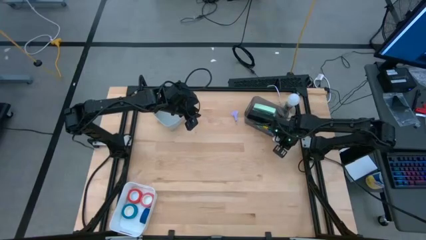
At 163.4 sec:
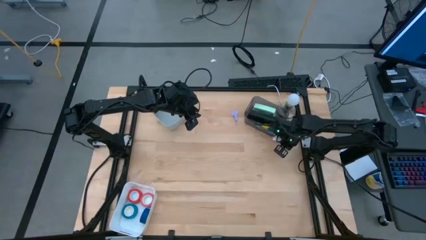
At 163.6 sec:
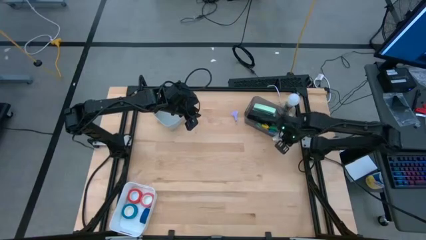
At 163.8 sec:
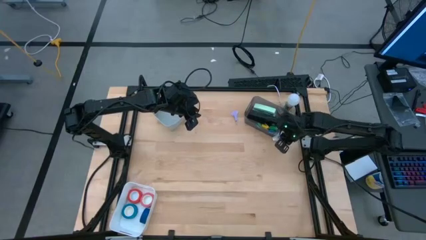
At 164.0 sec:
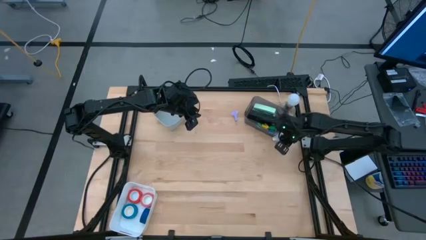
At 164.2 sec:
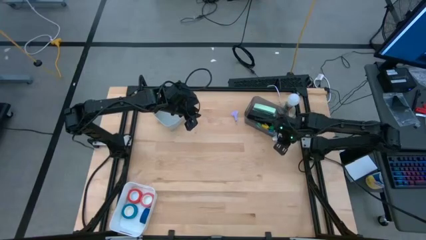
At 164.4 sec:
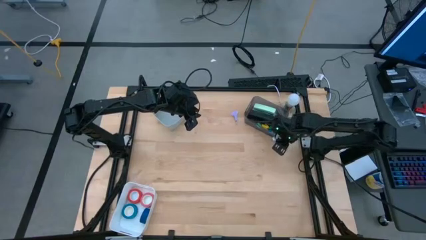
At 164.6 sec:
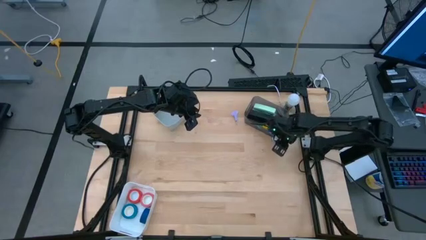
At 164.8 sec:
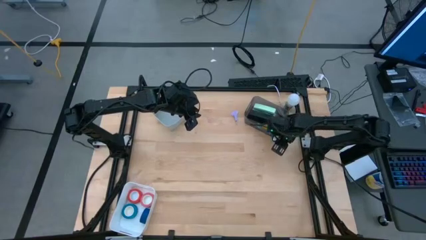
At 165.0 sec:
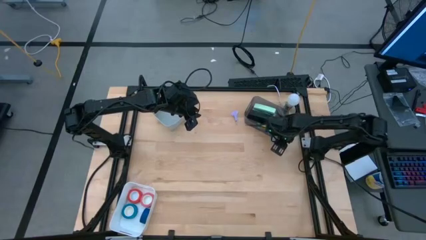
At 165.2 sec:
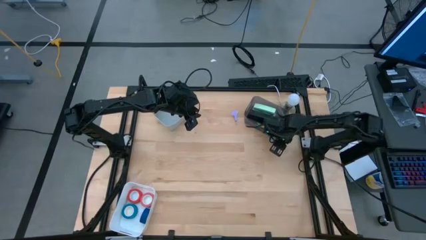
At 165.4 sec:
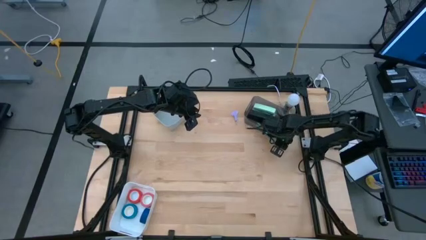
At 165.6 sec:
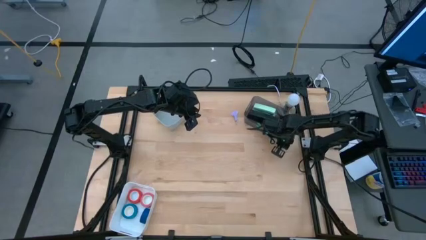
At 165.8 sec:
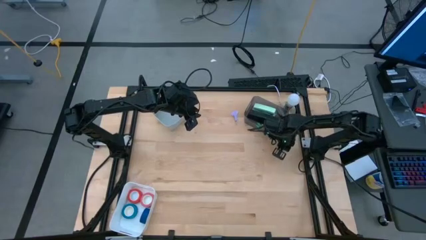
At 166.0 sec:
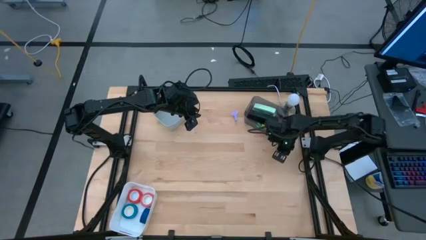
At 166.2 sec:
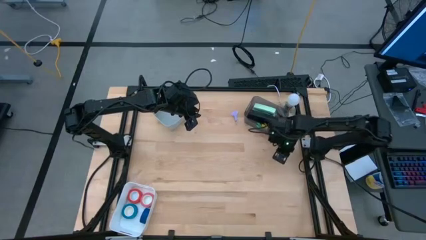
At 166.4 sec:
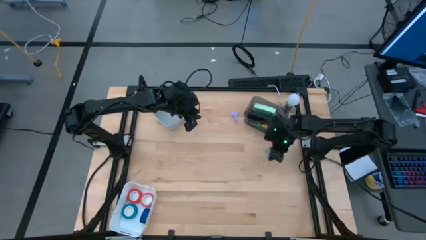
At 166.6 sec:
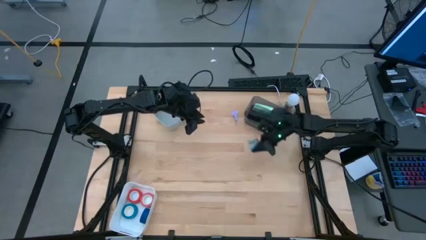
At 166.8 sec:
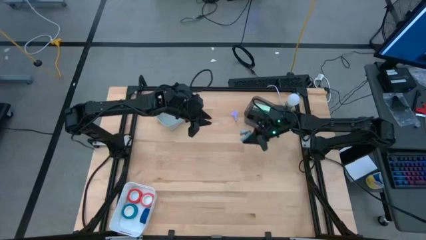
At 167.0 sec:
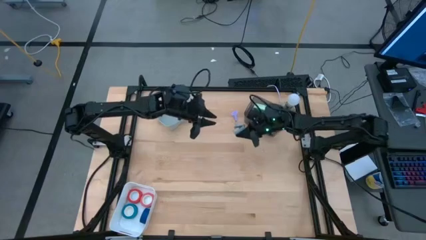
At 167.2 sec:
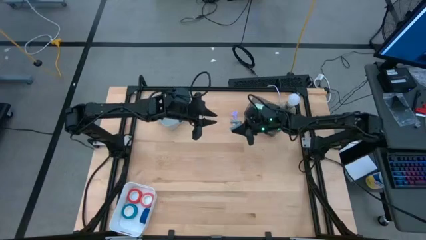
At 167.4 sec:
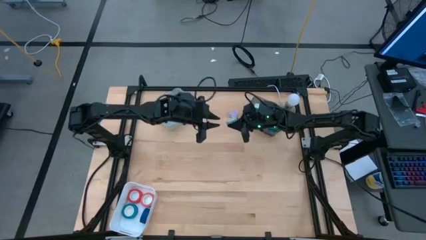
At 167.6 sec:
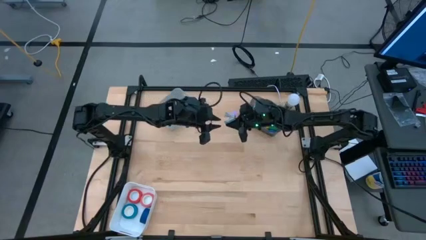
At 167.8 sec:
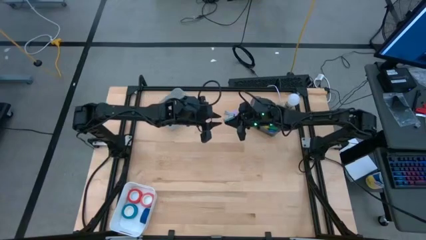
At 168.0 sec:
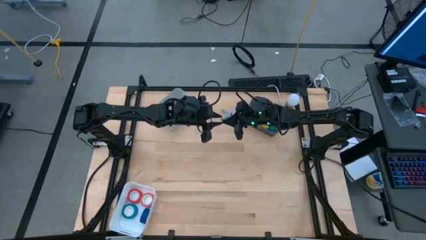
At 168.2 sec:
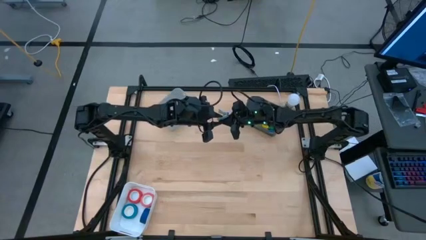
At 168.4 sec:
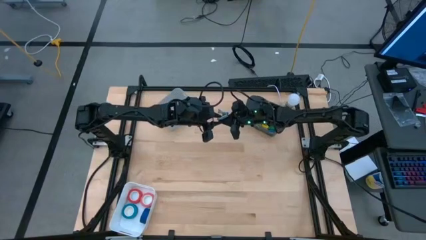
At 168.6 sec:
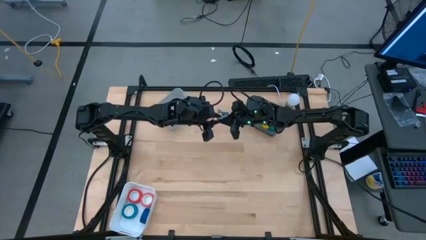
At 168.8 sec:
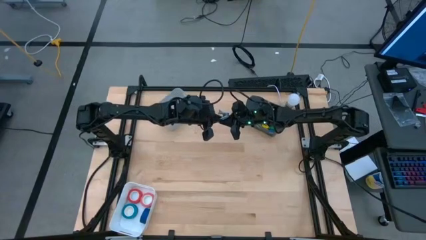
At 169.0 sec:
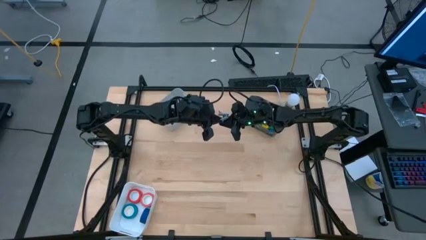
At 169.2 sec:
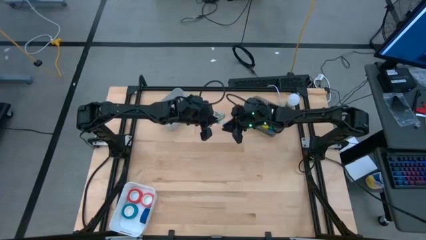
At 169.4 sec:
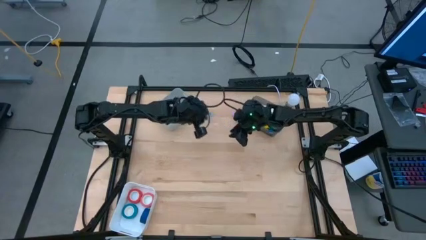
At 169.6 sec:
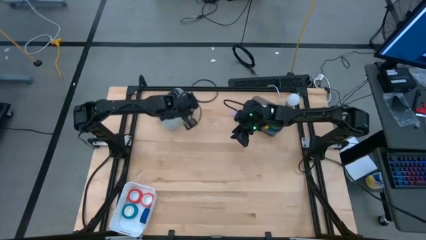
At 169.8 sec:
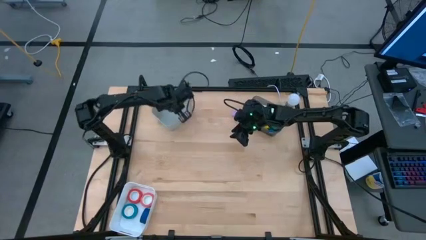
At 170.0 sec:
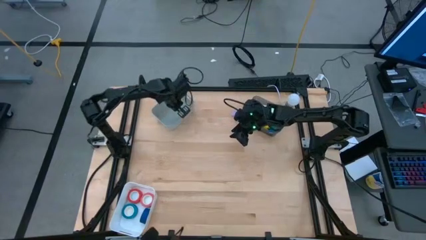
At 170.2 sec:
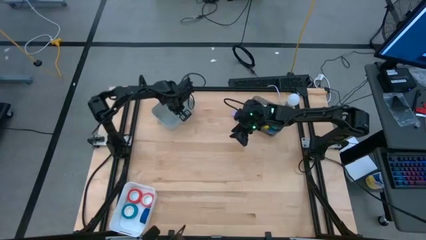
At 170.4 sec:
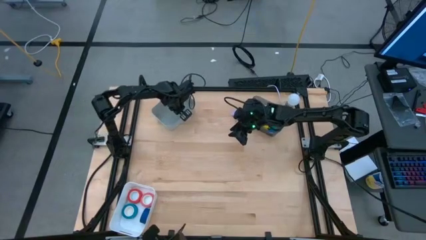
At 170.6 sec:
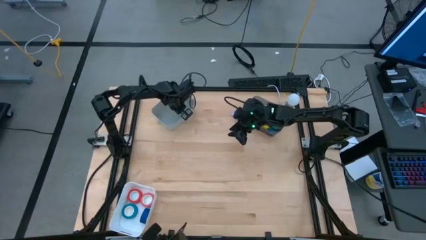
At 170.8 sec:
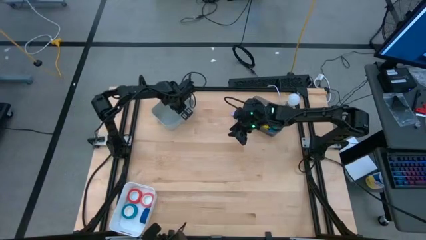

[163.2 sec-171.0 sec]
Task: Pick and place Stapler, Stapler remover, tape
Put the light blue staple remover into the grey bin

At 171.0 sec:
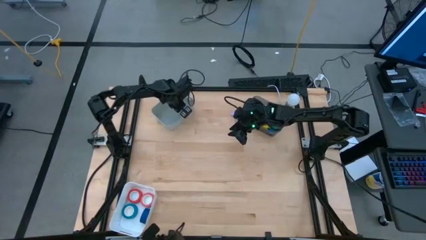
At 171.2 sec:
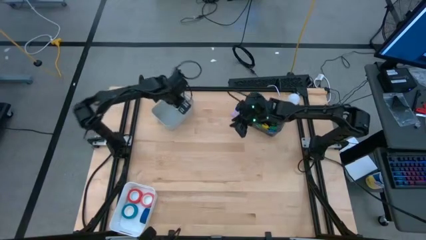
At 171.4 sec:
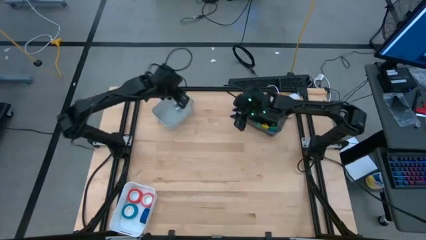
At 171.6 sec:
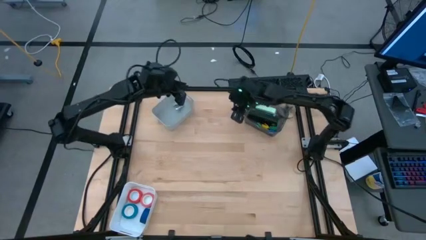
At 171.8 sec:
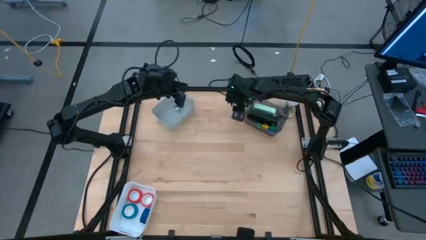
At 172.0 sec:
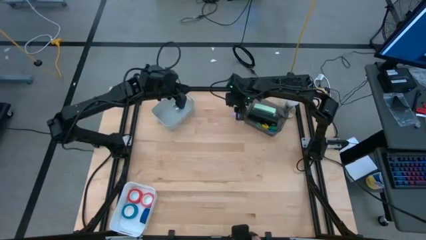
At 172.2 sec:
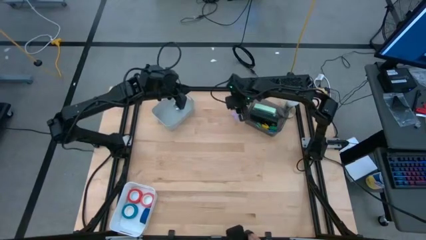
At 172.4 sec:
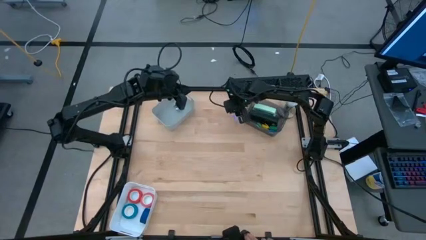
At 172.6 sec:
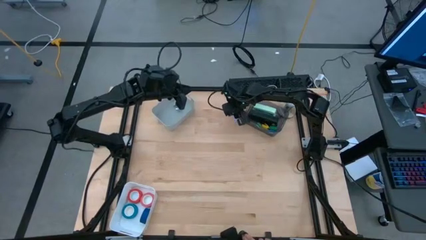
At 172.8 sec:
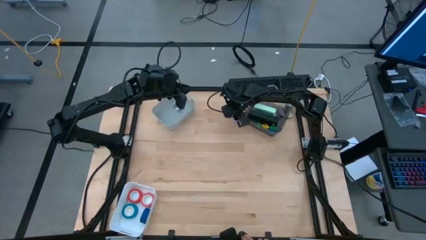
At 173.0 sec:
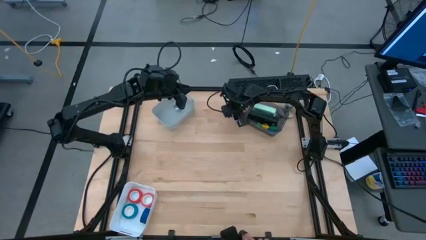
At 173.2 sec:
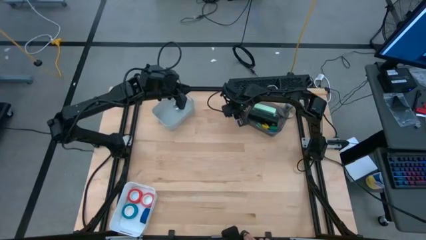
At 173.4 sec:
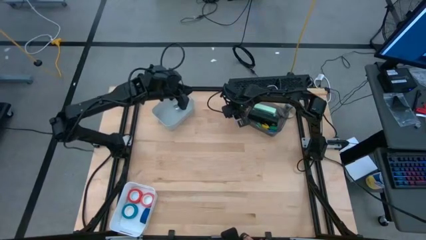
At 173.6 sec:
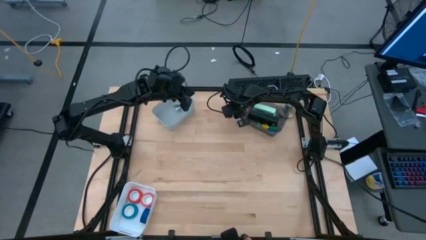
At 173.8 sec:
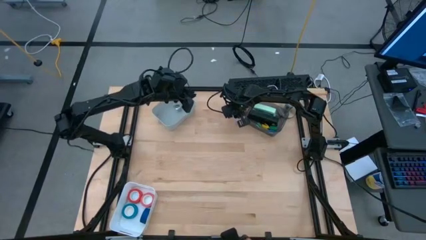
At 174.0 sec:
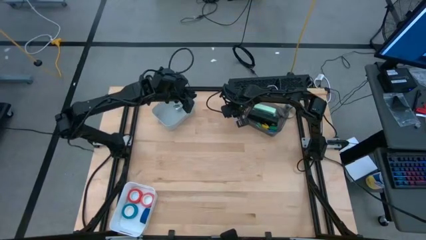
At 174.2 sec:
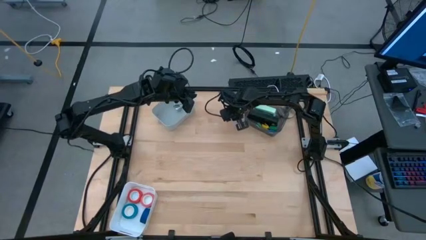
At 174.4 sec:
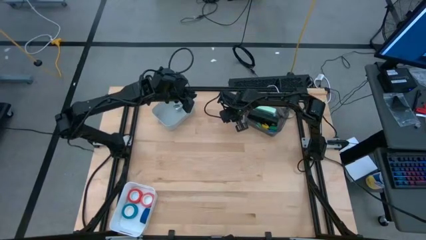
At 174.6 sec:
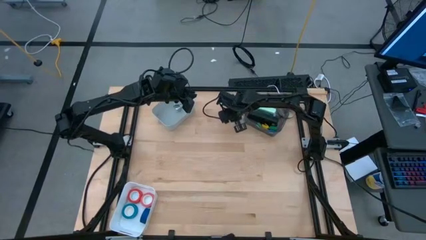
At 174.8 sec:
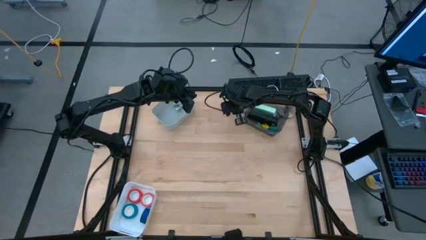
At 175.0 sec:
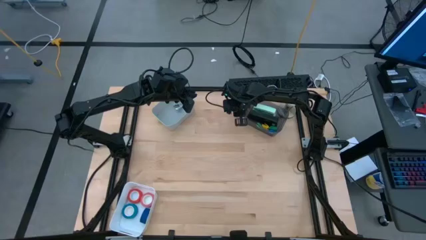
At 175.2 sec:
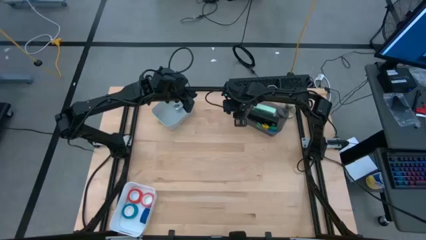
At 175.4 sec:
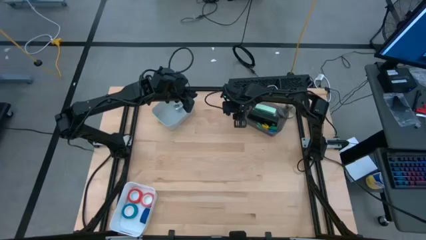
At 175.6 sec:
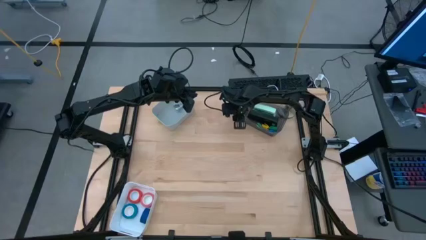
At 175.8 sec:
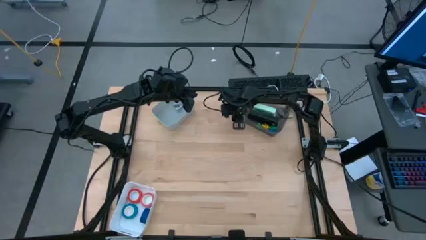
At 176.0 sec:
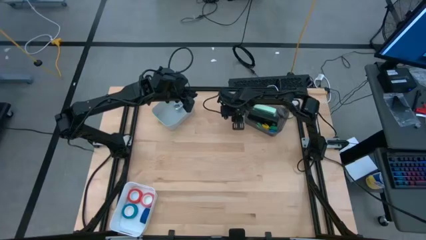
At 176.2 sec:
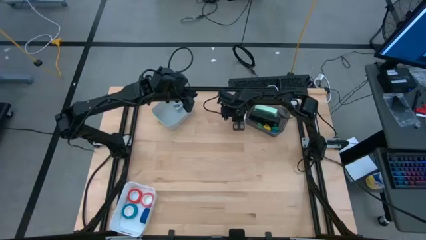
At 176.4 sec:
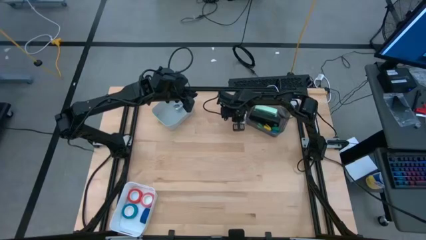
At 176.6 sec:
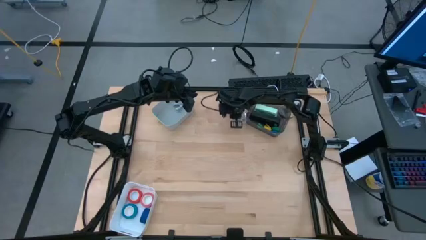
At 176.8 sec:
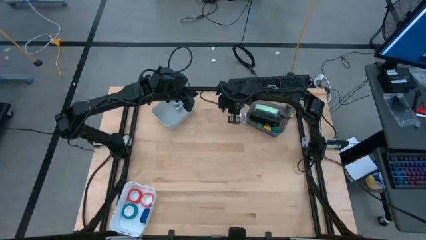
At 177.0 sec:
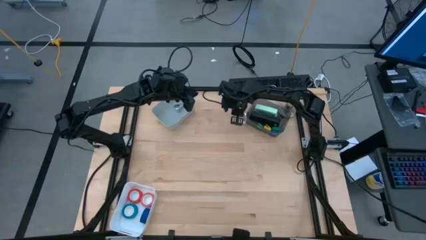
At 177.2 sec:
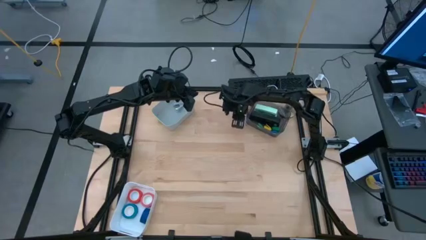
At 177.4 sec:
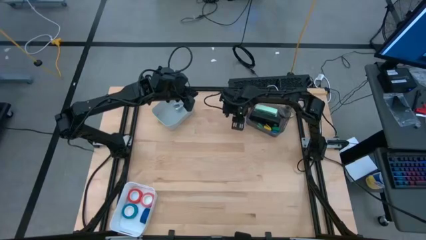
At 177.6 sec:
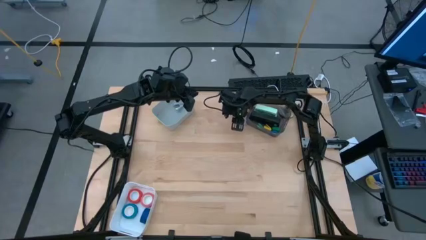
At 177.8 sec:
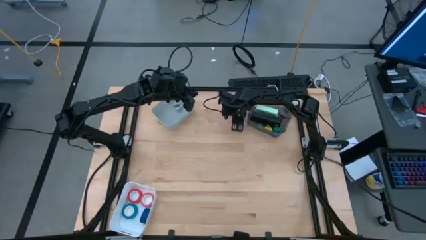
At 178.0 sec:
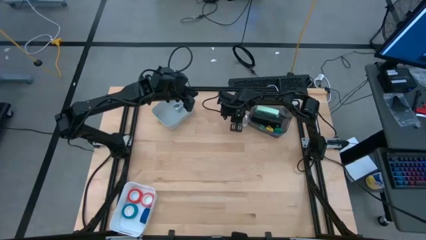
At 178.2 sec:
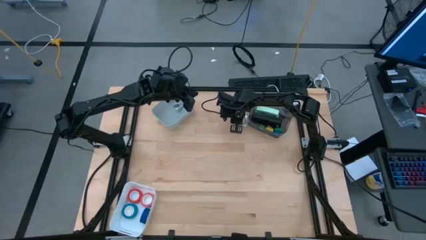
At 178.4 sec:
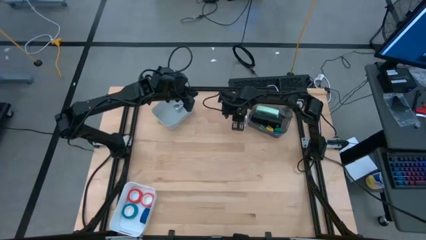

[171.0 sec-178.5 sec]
Put the purple staple remover into the grey bin
